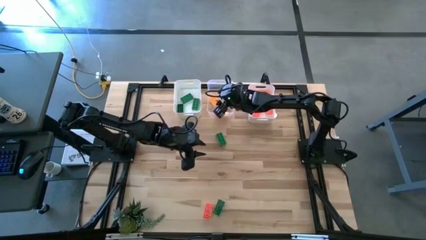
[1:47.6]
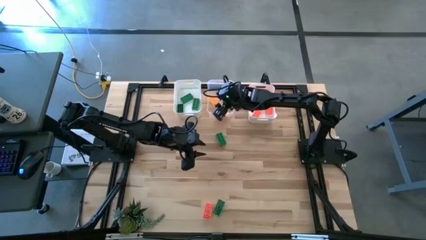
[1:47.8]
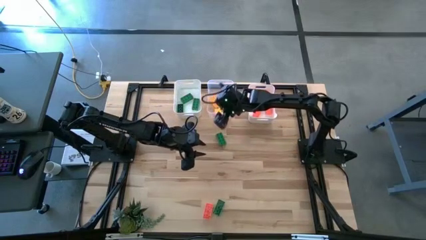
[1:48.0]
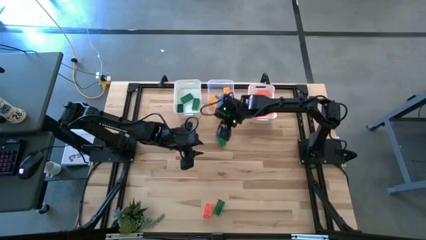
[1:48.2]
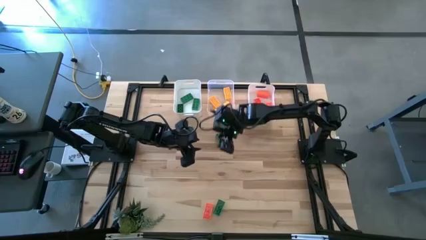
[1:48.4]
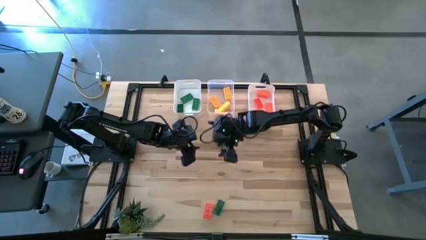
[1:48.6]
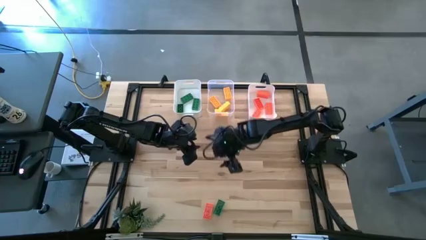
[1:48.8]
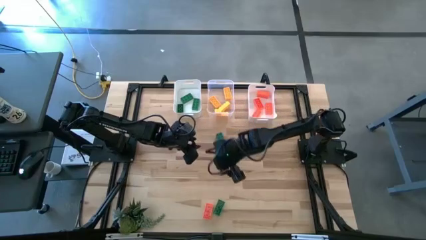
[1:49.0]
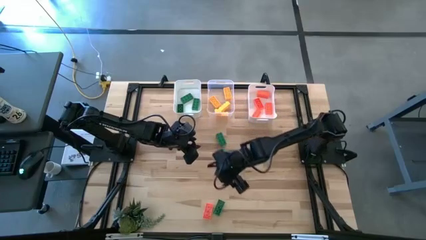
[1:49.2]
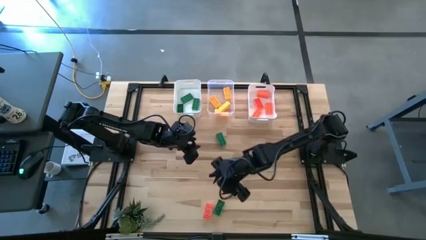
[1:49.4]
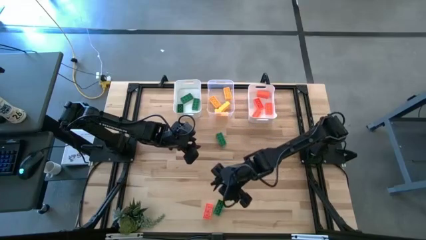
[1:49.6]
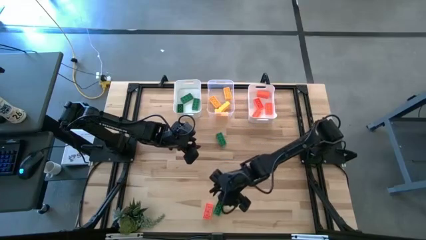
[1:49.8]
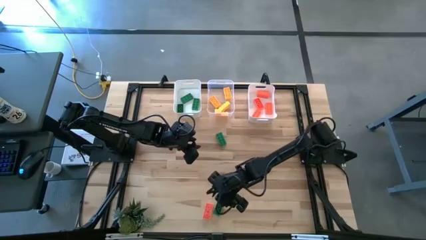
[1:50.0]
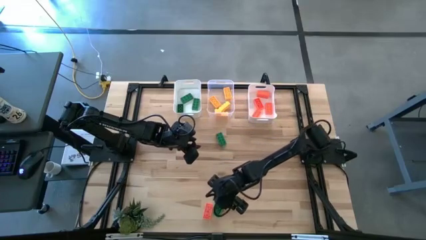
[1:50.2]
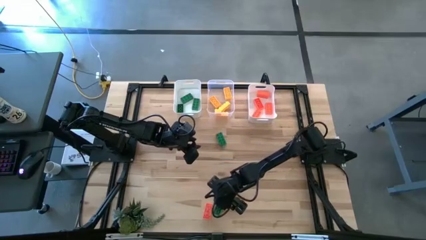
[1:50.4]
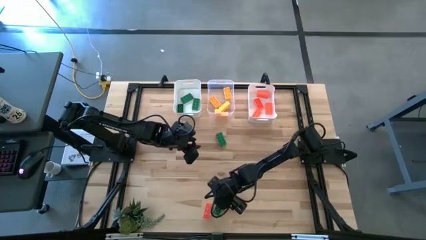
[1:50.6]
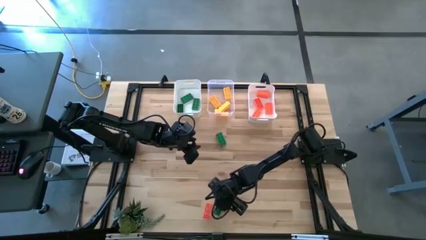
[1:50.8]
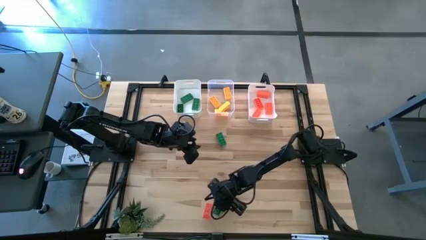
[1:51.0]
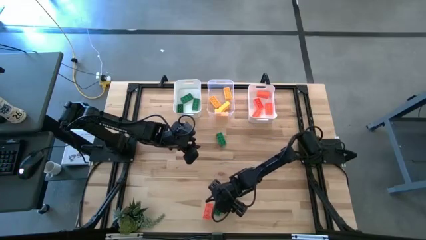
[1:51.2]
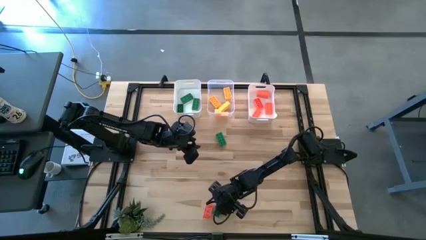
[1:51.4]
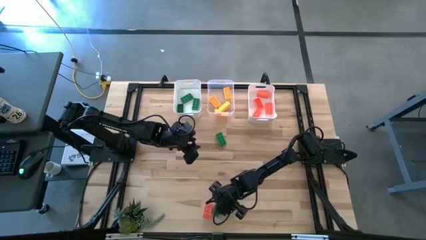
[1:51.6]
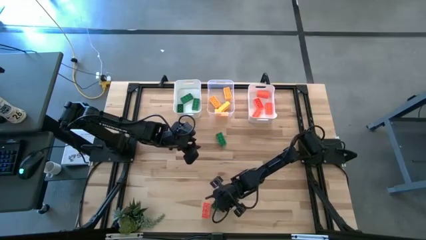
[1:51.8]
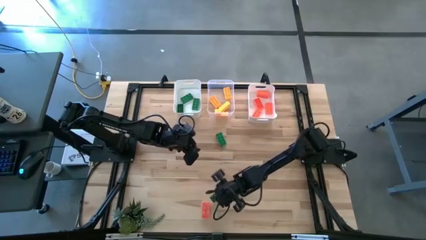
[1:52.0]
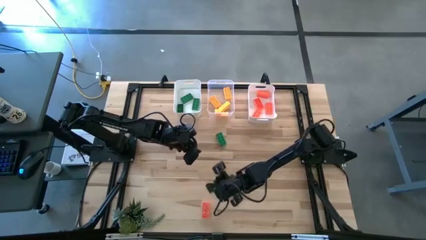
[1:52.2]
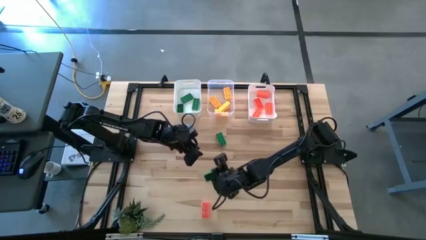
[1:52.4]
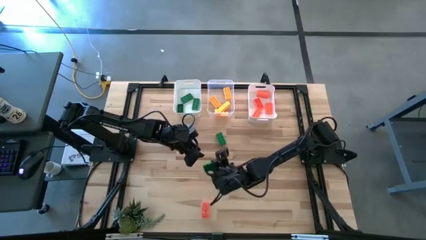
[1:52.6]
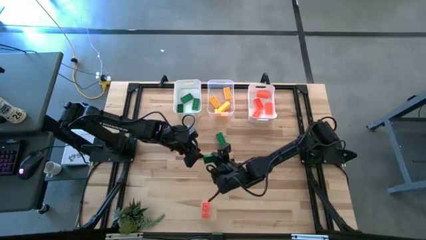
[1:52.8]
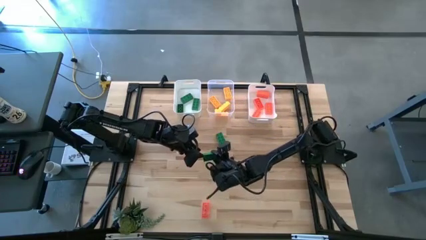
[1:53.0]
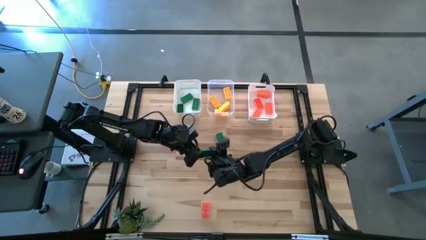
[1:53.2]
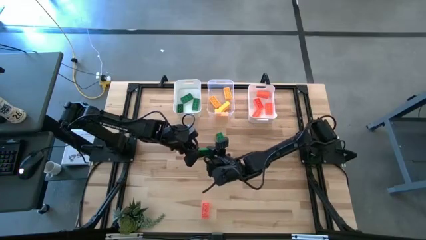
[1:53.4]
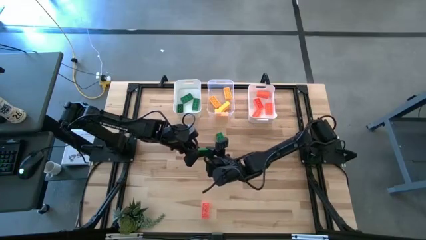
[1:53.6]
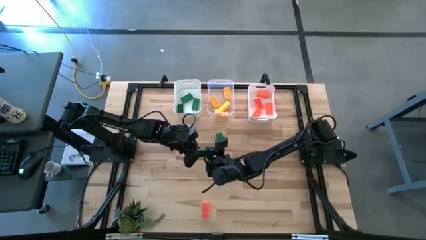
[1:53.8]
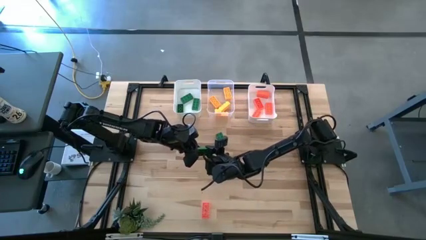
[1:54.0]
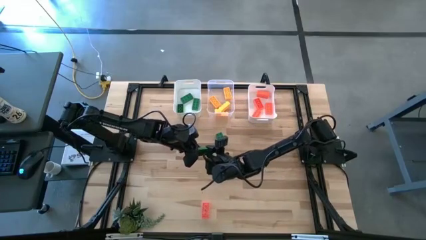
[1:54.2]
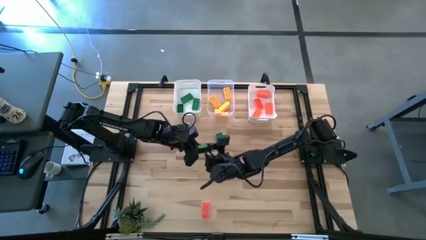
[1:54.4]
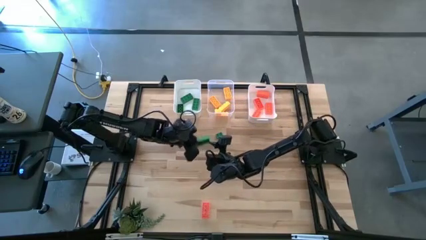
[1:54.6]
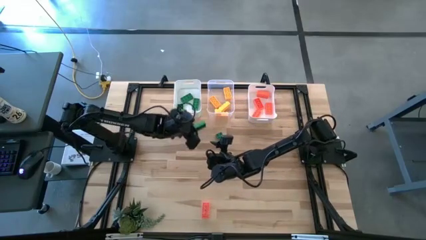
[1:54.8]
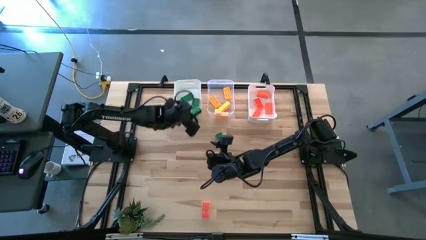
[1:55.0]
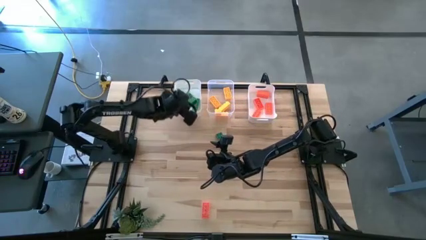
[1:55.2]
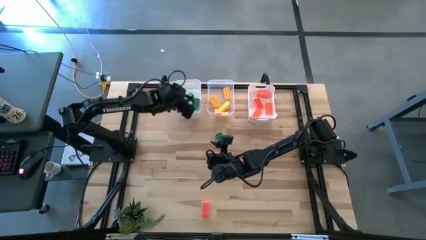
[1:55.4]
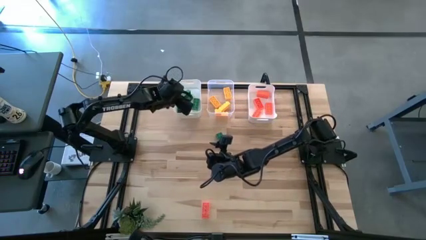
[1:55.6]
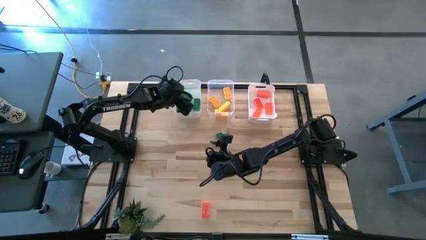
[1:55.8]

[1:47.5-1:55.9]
Task: Sort & place blocks by color
Put the green game piece into the left white bin

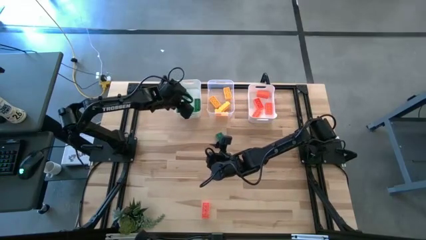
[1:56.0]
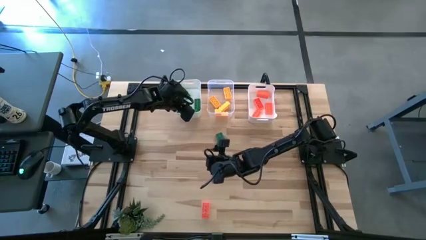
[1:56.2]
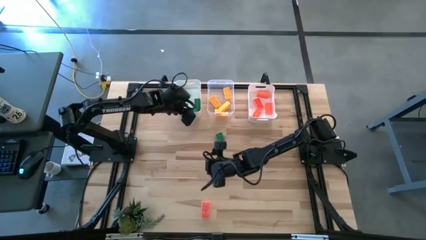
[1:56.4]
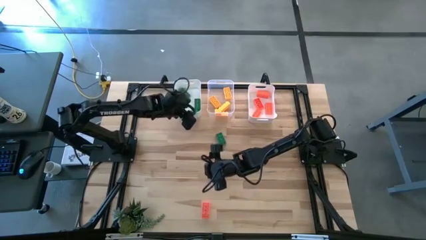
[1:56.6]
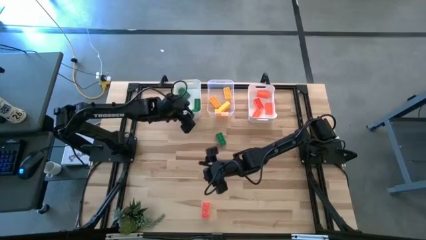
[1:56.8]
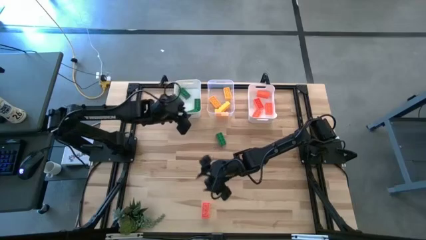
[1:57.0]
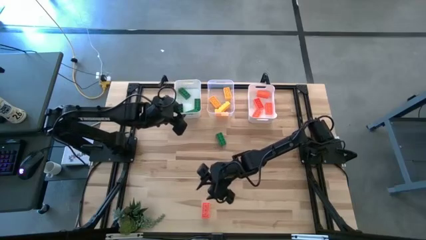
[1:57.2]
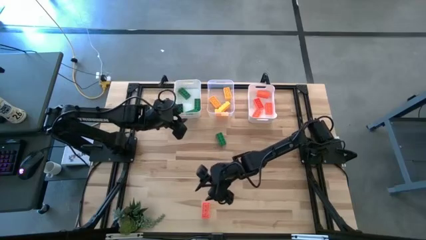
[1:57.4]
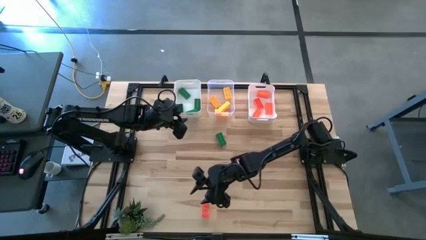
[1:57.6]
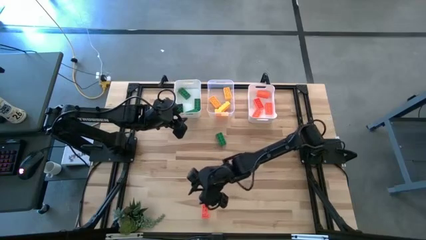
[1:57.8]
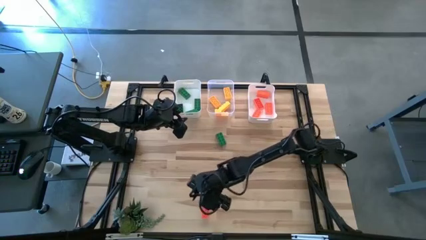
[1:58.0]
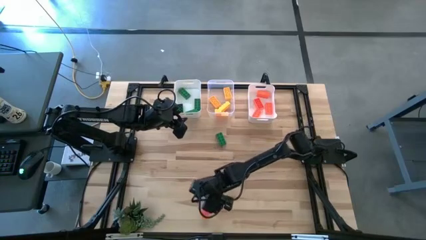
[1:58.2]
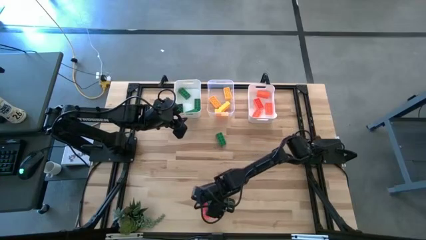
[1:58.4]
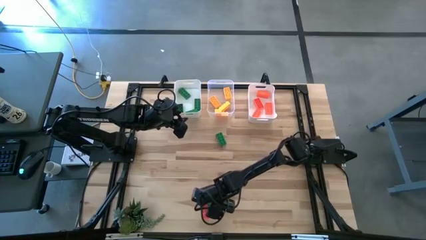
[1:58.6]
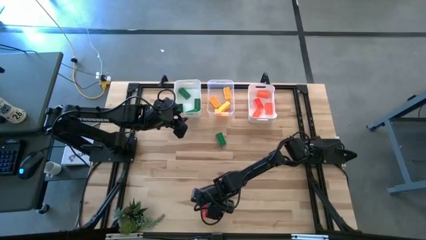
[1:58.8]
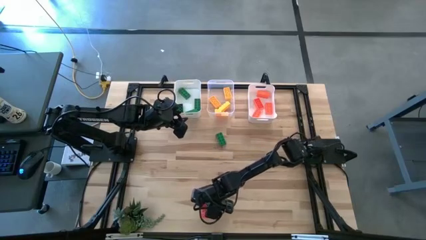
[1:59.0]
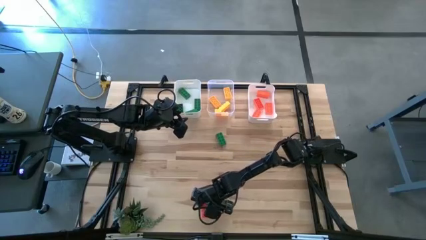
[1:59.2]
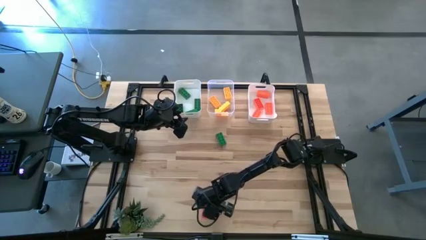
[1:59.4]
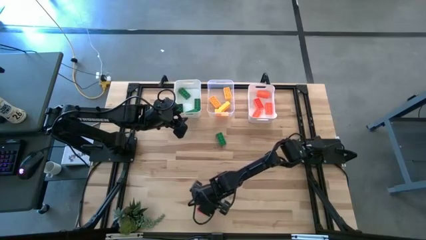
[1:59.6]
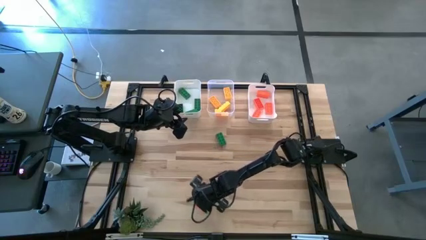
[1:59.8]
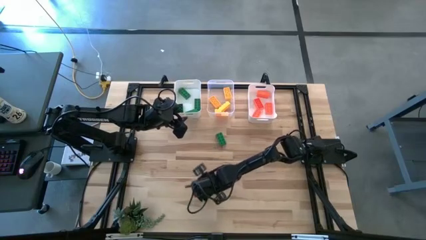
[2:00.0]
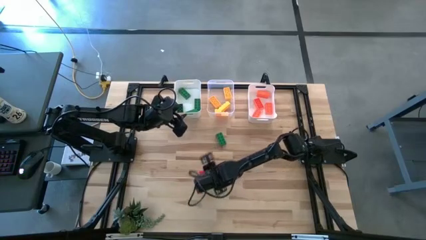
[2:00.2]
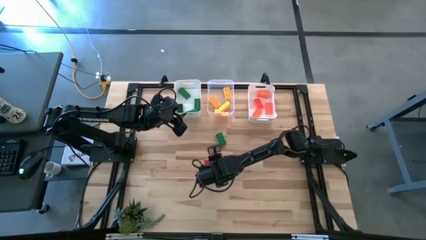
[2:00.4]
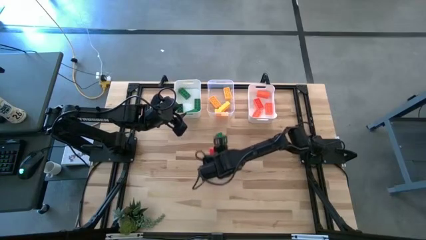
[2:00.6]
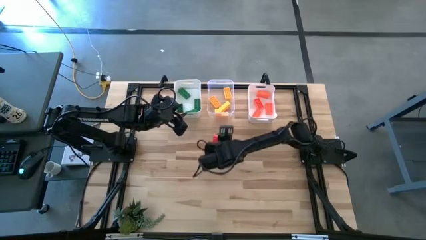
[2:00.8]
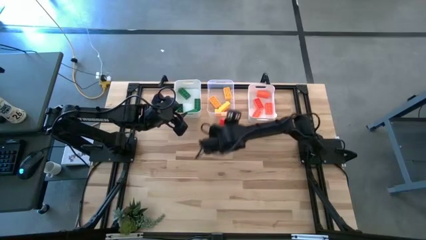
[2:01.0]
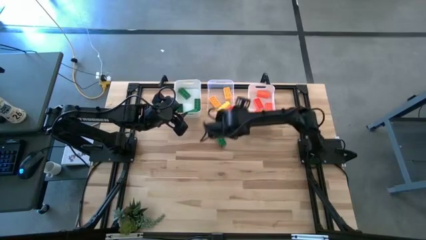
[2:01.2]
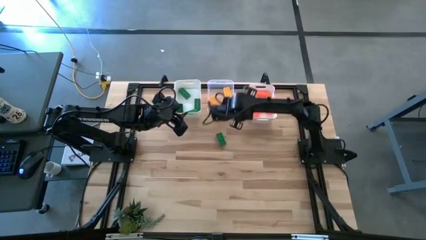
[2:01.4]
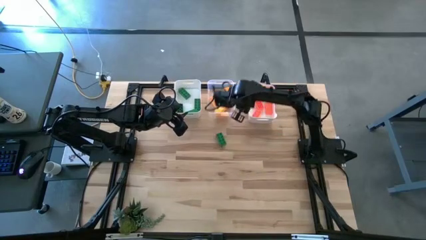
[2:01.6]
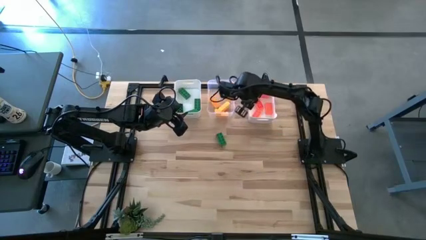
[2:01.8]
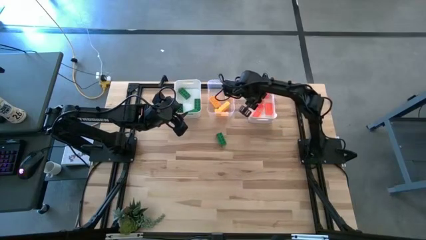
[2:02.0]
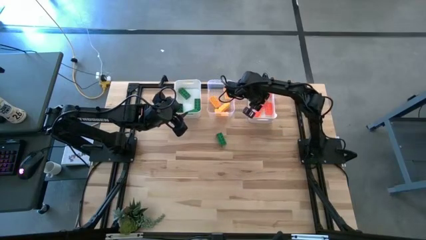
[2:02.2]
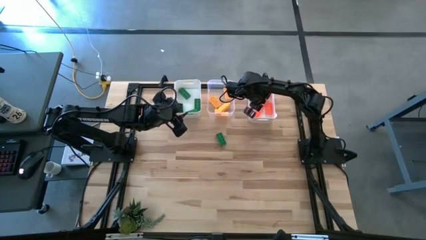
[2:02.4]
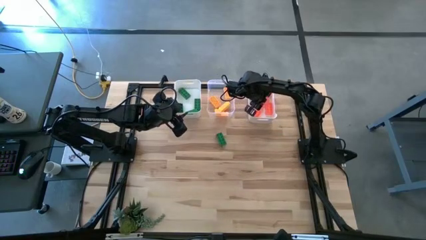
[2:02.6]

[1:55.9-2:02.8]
Put the orange game piece into the right white bin

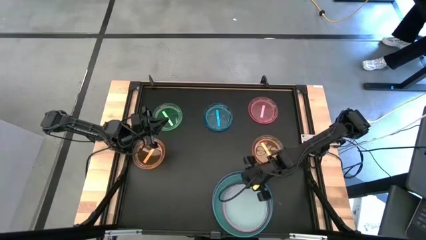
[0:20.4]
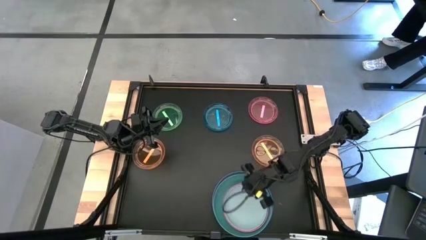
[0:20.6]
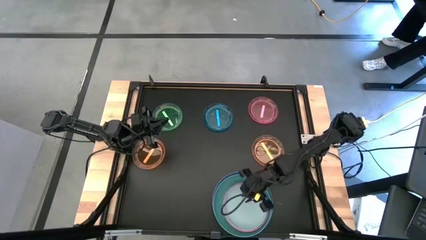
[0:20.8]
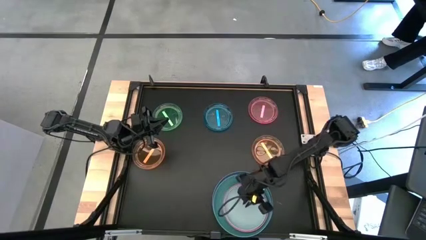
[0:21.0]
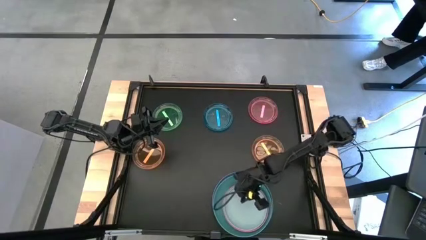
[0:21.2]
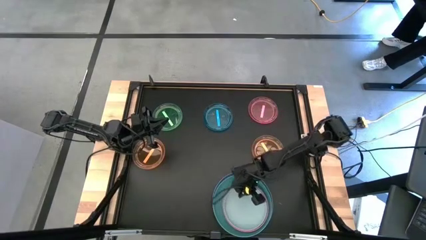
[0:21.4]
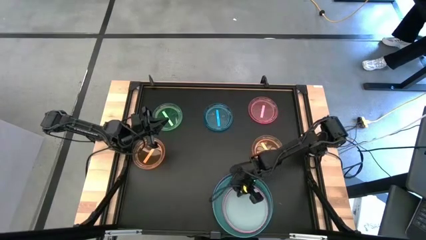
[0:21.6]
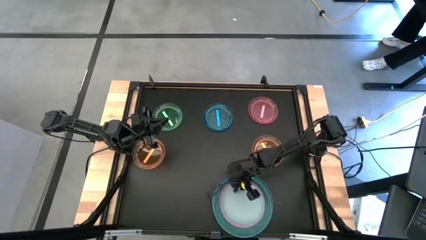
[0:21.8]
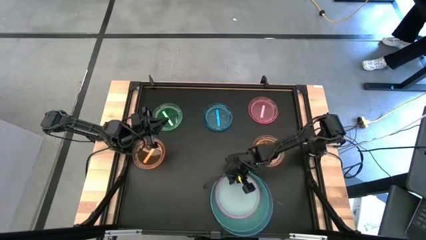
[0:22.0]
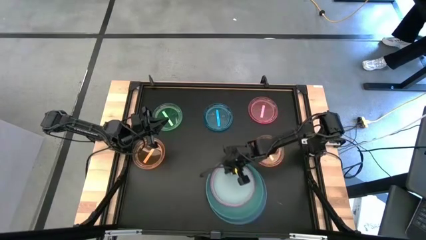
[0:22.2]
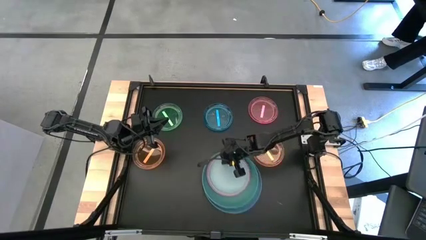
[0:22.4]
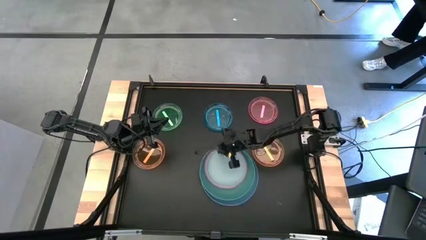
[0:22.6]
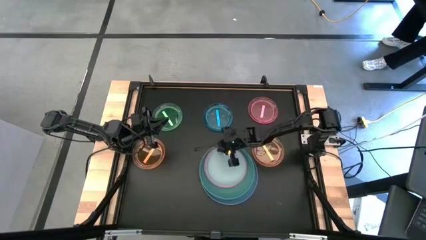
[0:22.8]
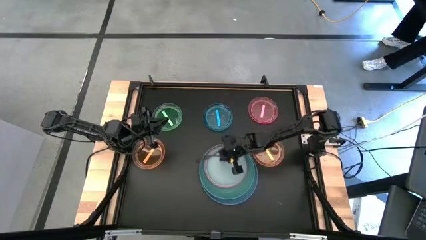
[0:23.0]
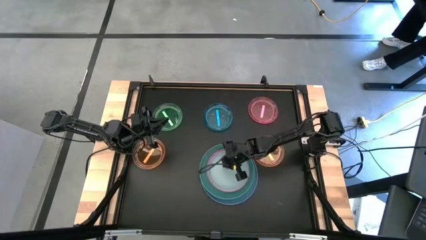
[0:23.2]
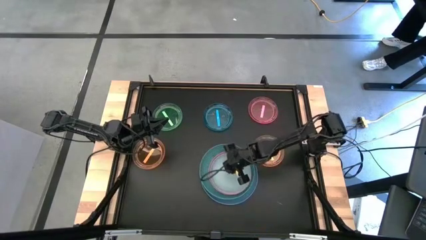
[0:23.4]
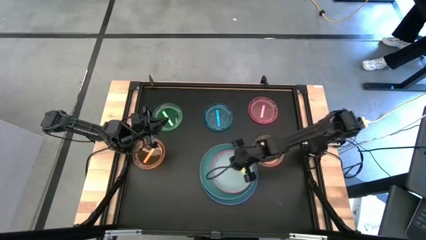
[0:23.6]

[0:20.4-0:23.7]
Task: Stack plastic plates
Move the stacked plates to the center
